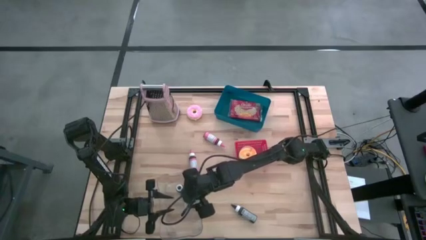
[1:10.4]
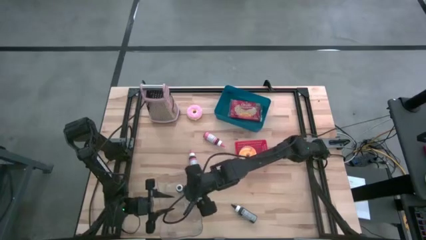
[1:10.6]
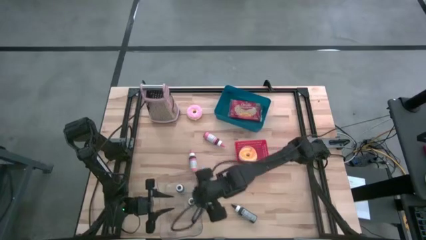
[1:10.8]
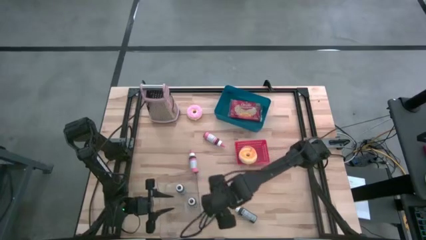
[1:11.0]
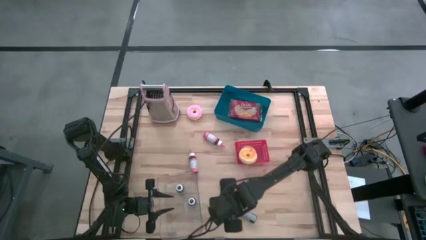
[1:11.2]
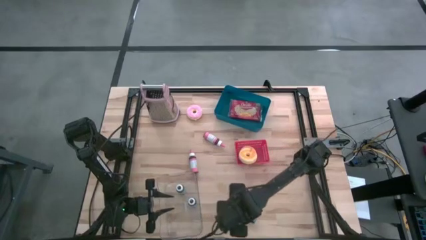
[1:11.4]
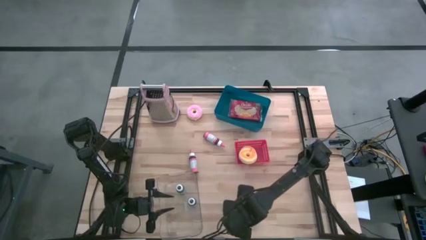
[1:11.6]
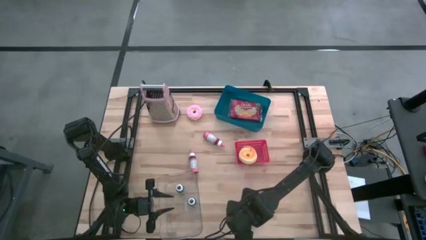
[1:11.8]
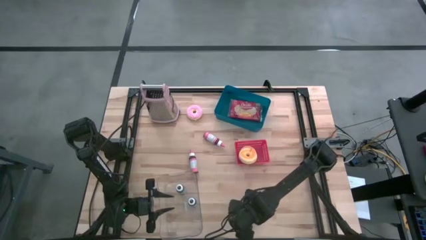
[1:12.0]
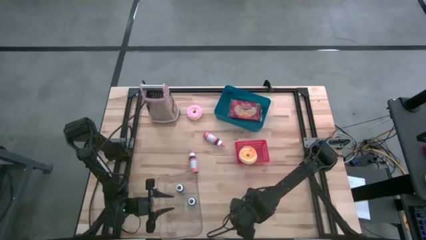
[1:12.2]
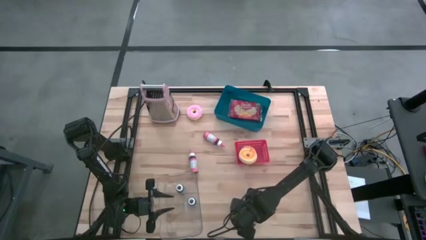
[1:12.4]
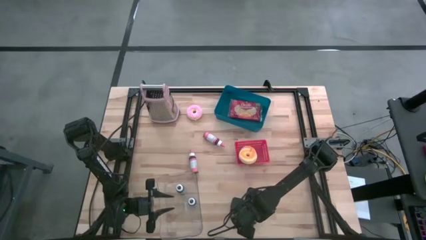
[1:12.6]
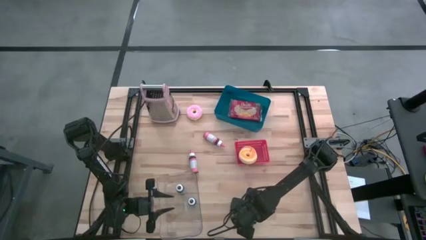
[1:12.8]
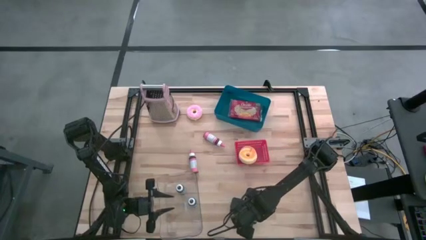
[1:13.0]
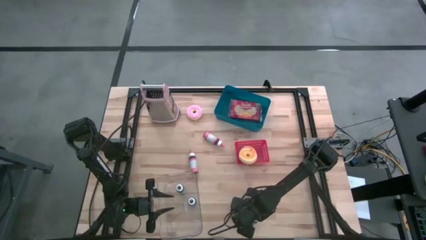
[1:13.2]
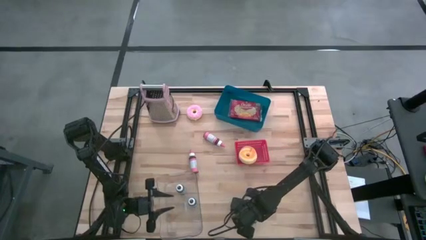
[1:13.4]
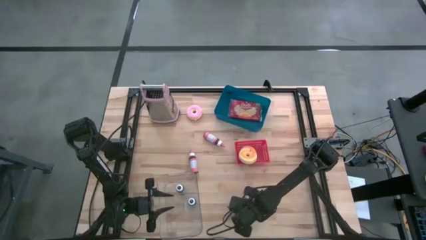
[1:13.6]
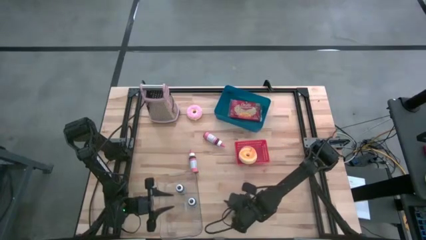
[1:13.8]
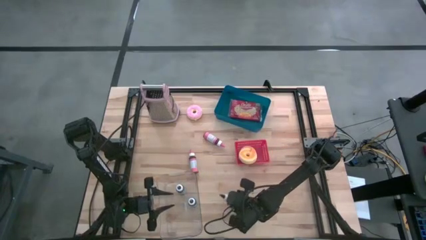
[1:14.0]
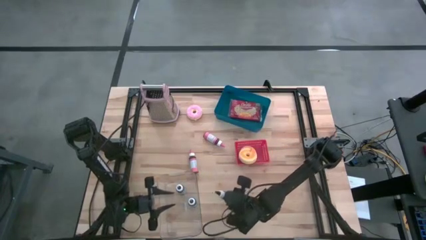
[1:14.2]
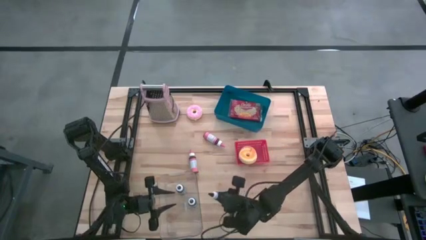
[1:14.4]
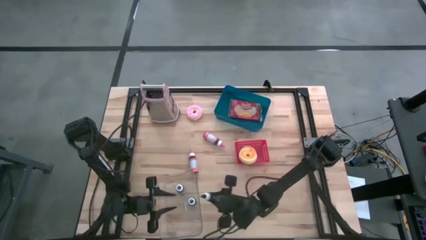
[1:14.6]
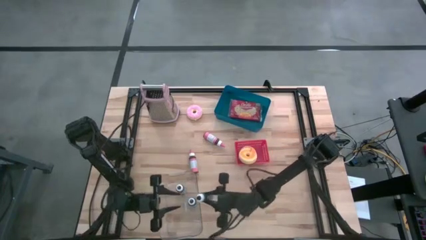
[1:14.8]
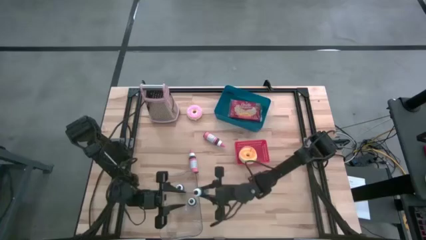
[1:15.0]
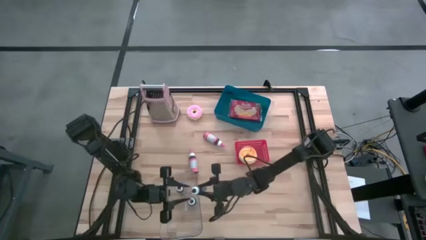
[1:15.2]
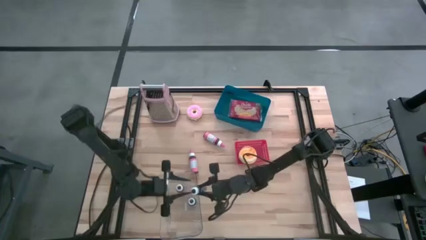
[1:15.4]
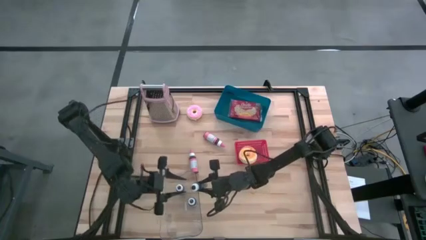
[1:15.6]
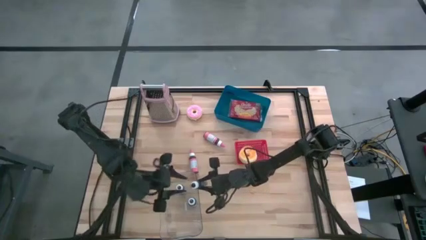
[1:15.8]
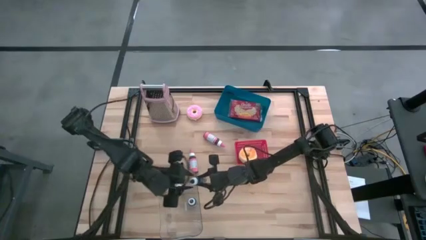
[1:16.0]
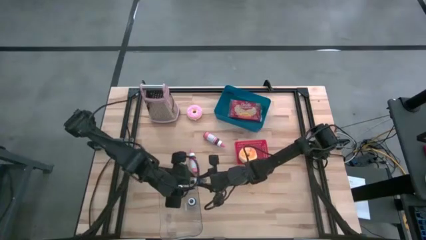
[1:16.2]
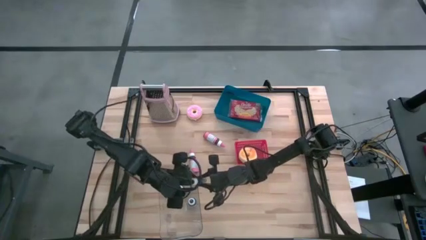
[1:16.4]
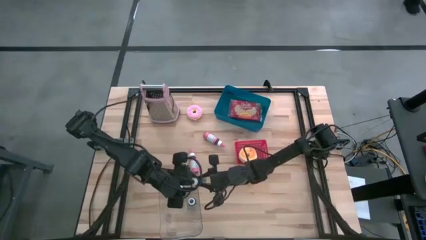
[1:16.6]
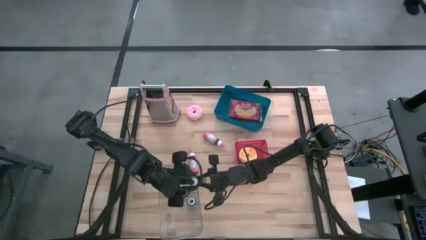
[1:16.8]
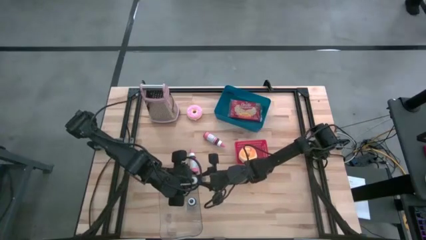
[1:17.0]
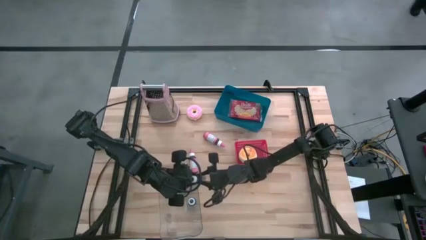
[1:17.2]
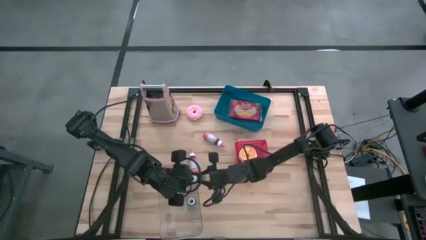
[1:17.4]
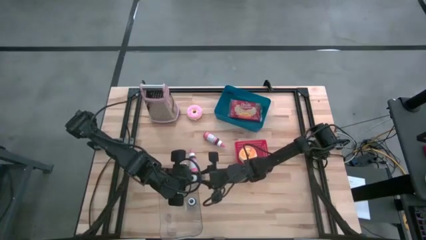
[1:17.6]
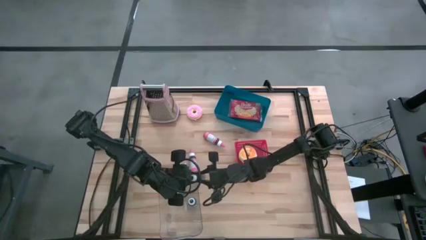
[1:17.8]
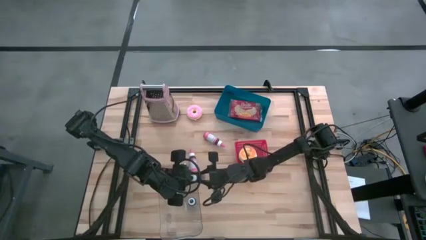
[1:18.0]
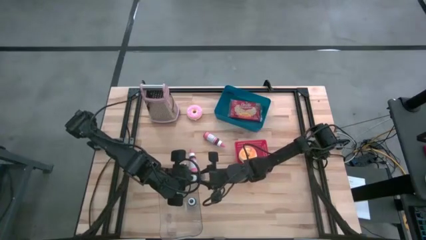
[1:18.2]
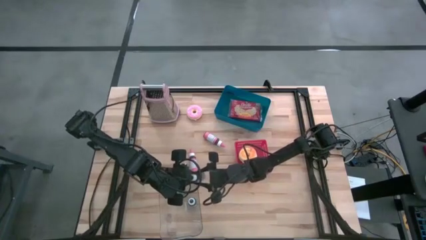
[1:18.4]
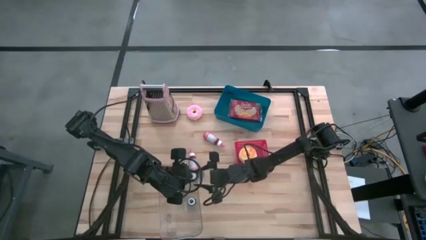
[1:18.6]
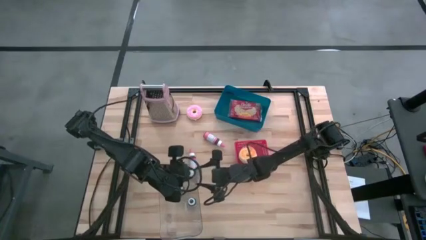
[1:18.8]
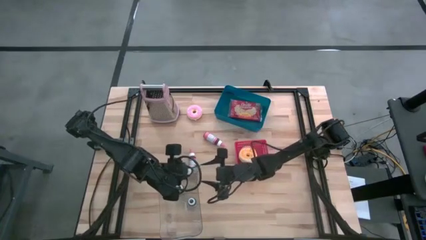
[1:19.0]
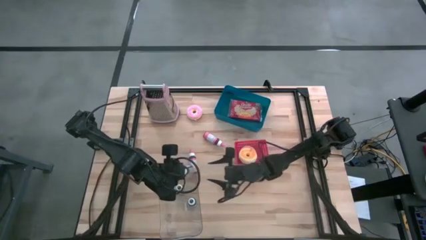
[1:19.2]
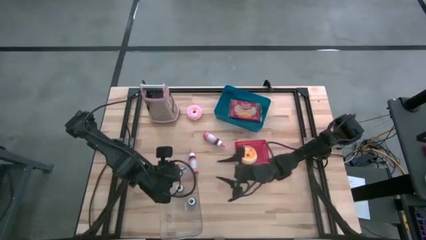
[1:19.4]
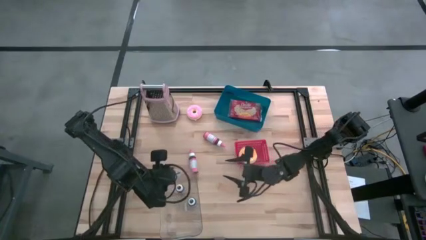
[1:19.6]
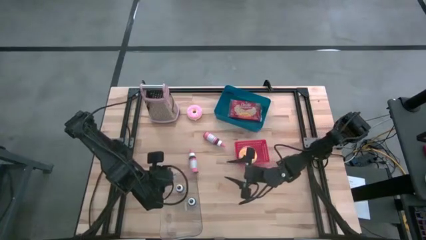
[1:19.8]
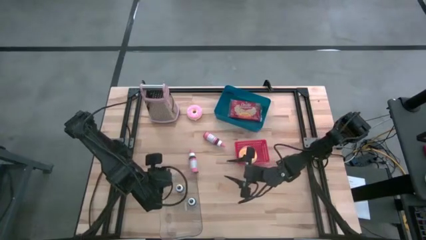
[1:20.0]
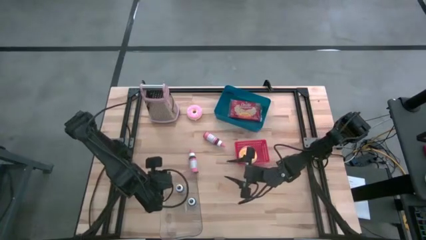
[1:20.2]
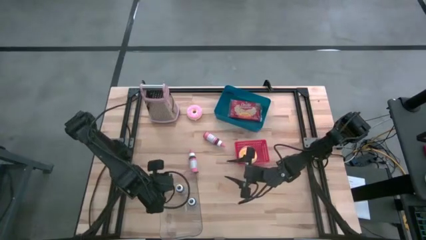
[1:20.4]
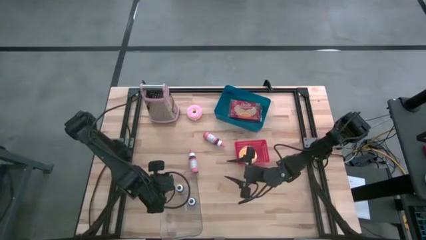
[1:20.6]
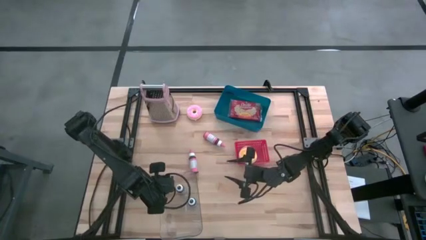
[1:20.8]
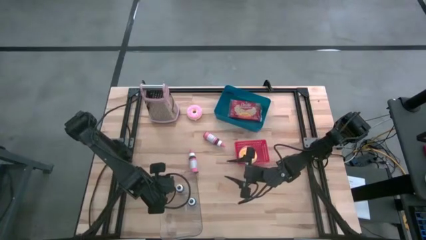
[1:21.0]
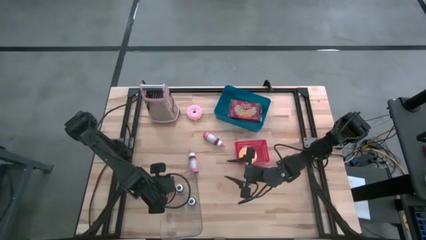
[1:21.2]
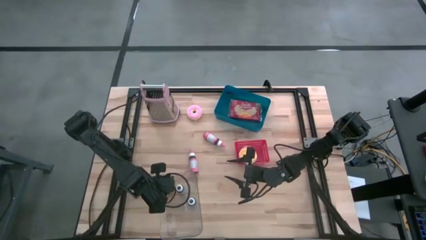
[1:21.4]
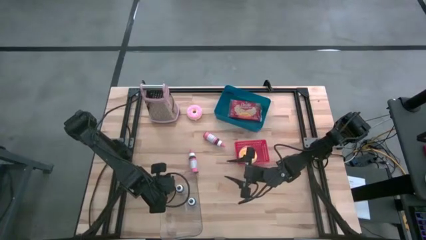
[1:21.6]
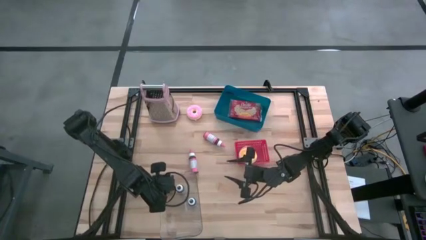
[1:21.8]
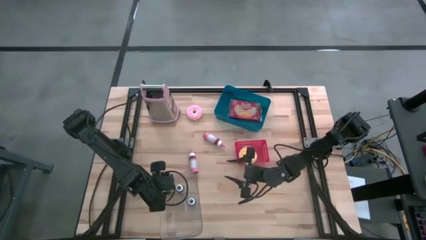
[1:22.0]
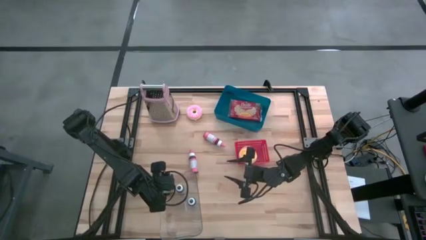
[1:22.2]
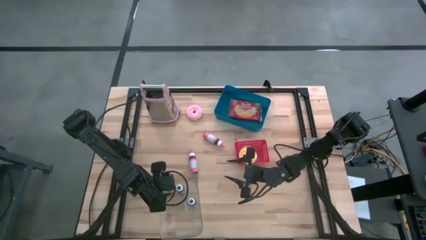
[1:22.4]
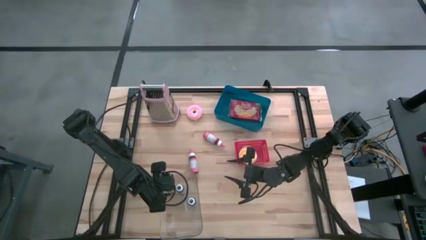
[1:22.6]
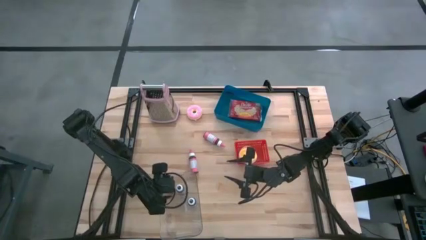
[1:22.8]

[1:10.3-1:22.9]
Task: Pick & Place Food Item
Put the black food coloring bottle into the transparent bin
